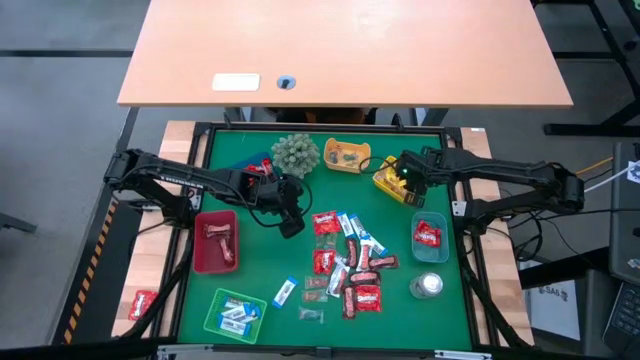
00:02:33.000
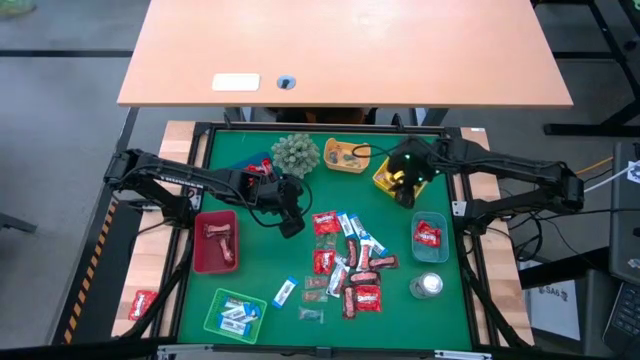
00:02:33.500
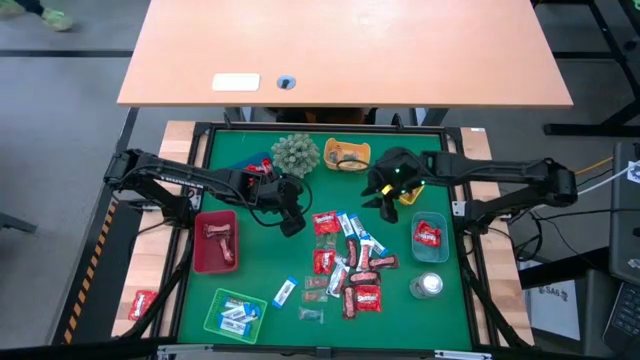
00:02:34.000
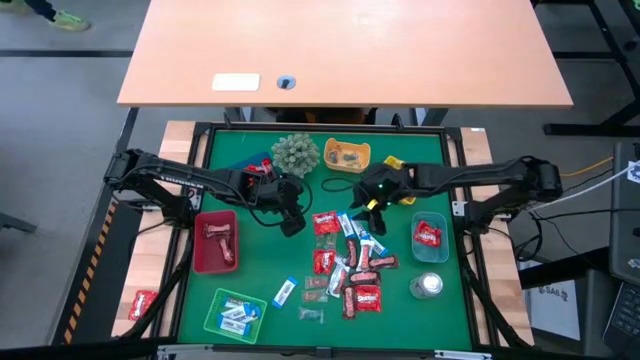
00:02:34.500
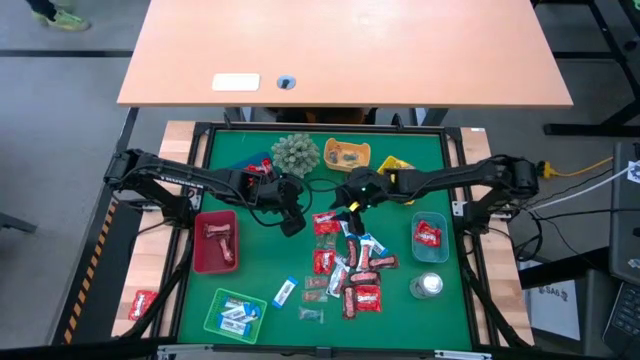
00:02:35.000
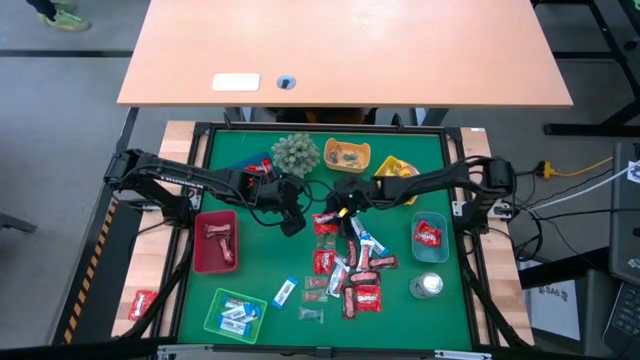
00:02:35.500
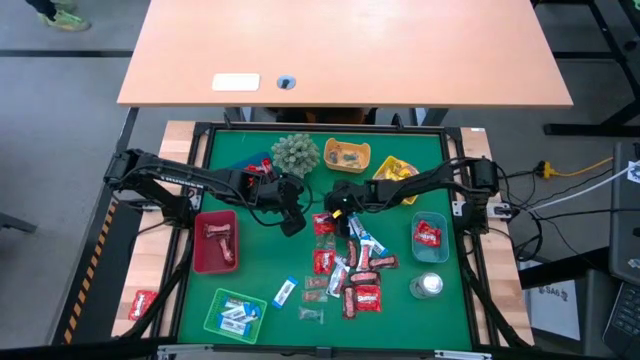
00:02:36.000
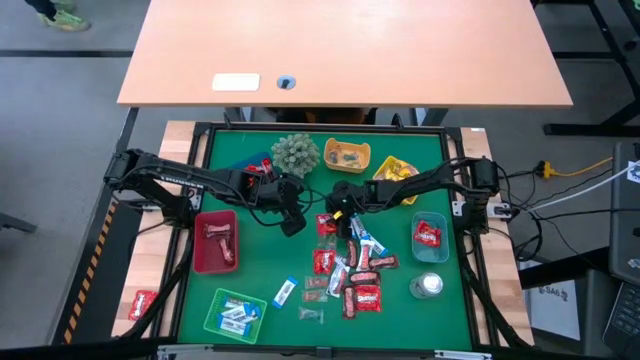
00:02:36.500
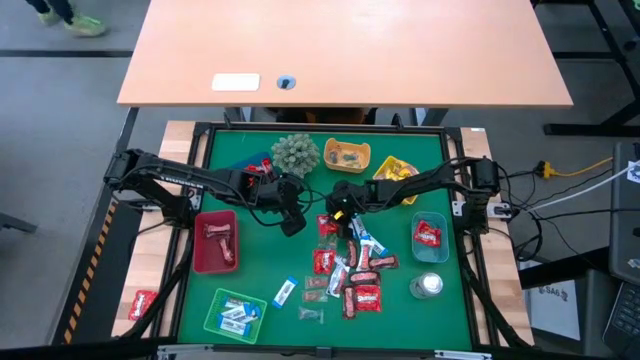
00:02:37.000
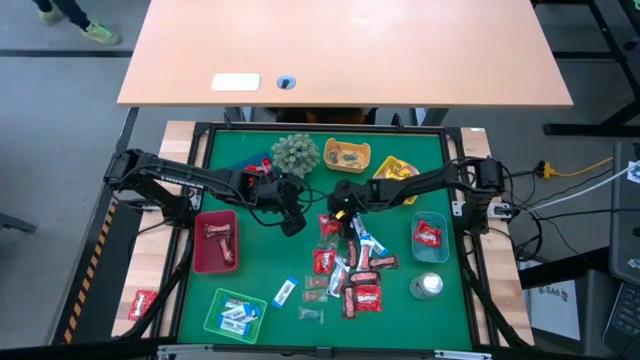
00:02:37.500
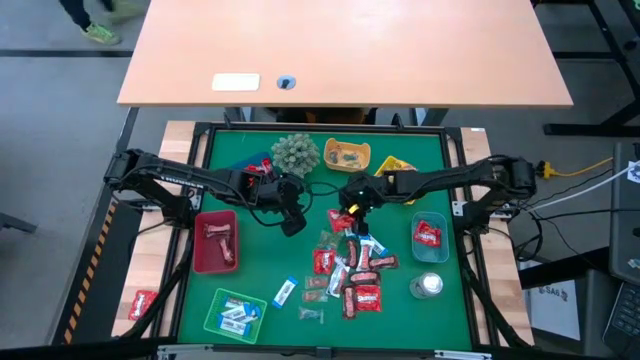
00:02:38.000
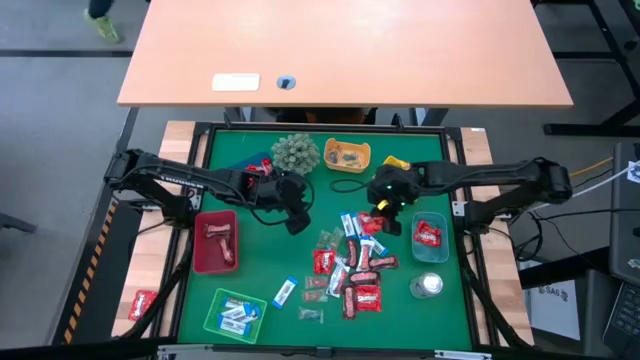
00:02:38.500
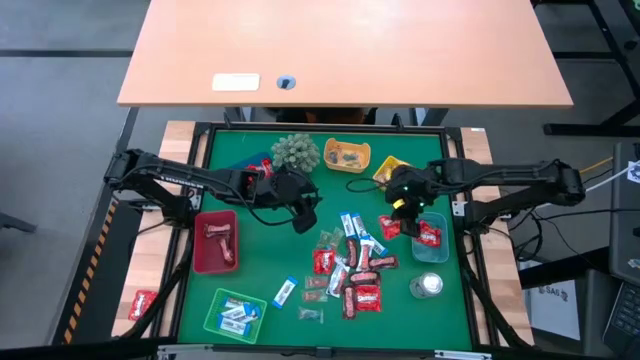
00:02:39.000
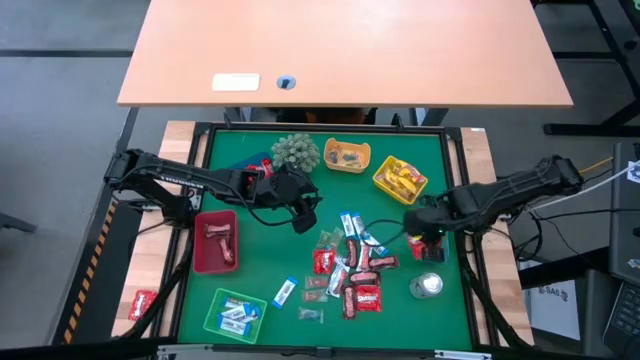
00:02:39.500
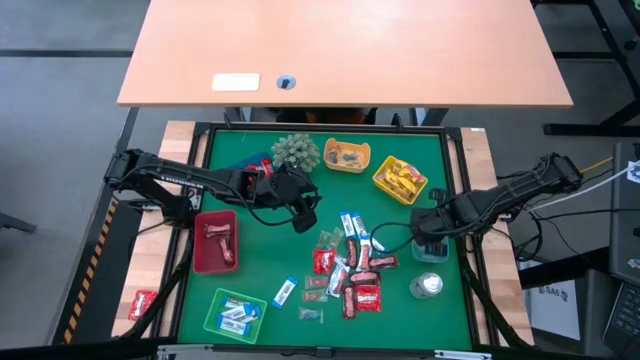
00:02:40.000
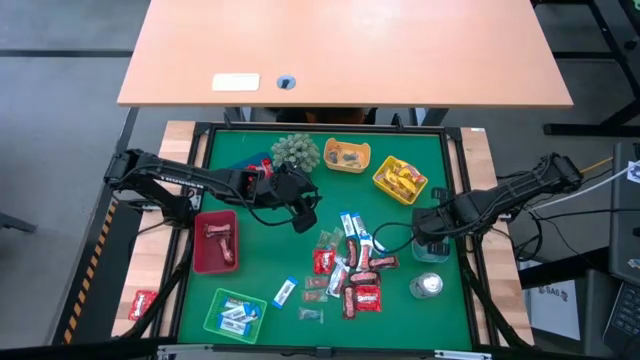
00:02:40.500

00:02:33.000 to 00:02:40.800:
Task: Sort candy
Put the red candy into the gray bin

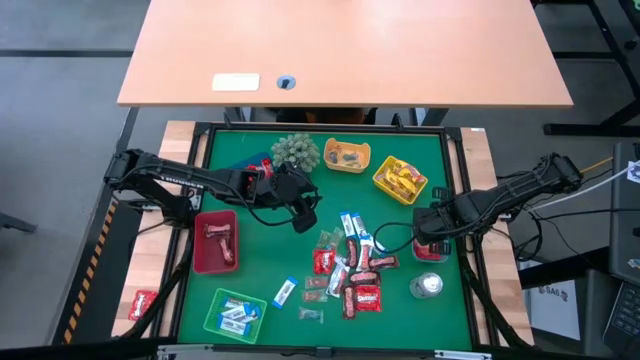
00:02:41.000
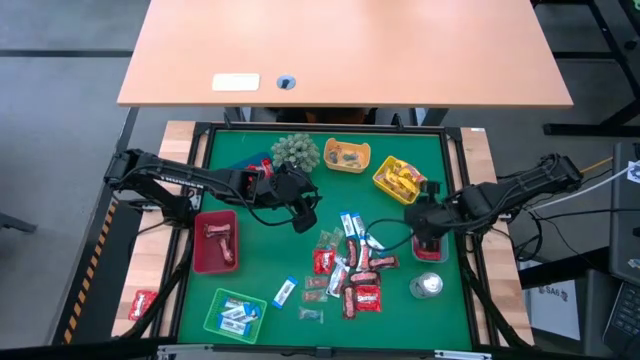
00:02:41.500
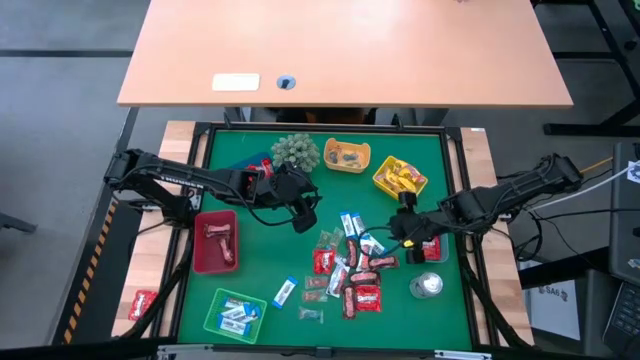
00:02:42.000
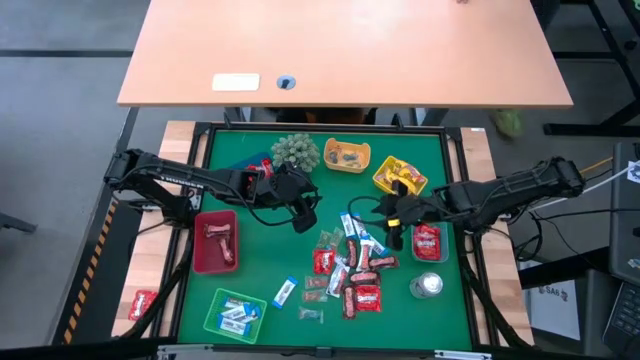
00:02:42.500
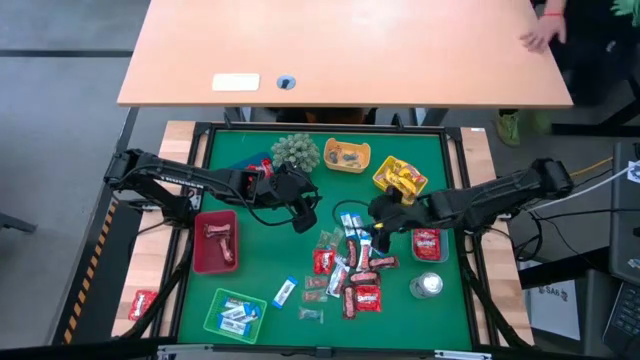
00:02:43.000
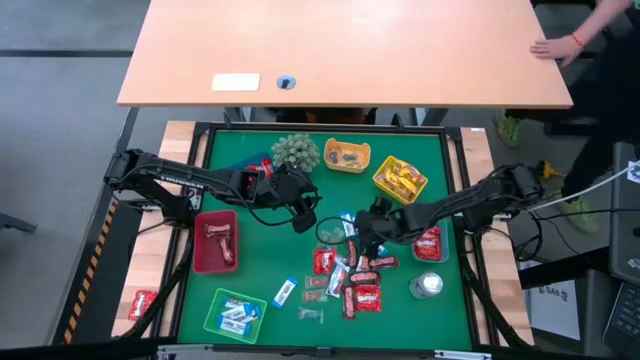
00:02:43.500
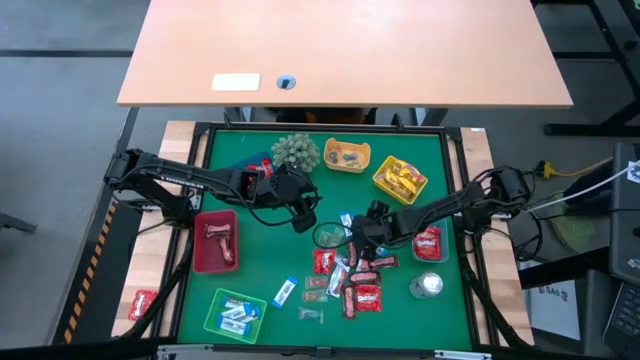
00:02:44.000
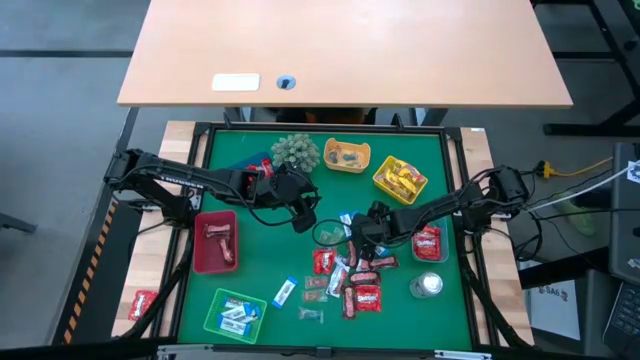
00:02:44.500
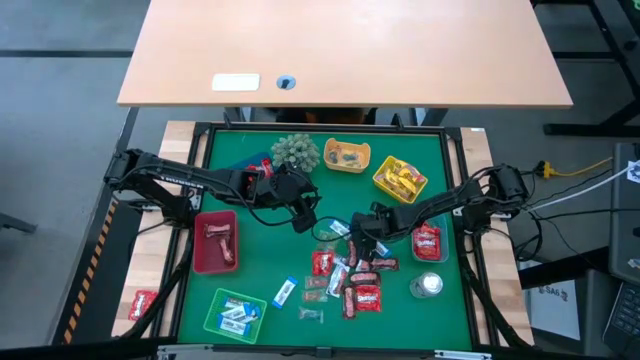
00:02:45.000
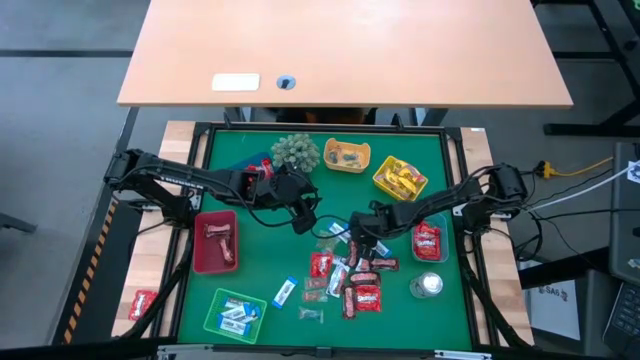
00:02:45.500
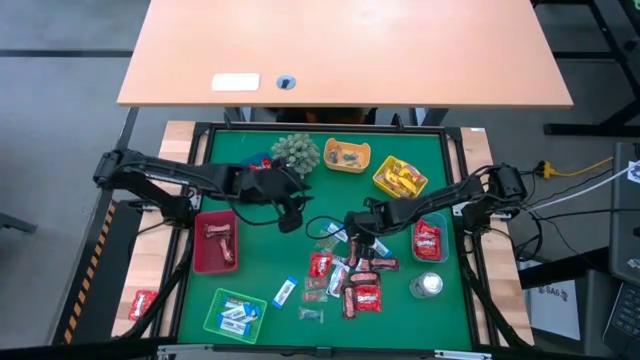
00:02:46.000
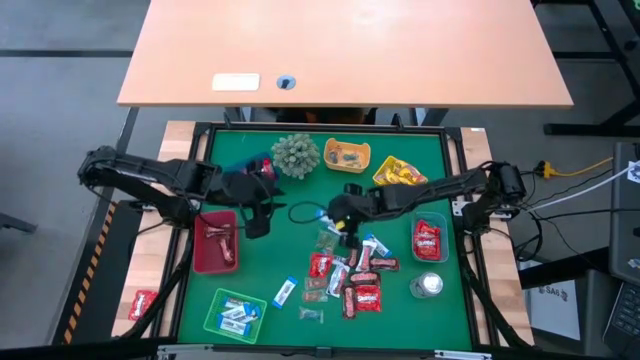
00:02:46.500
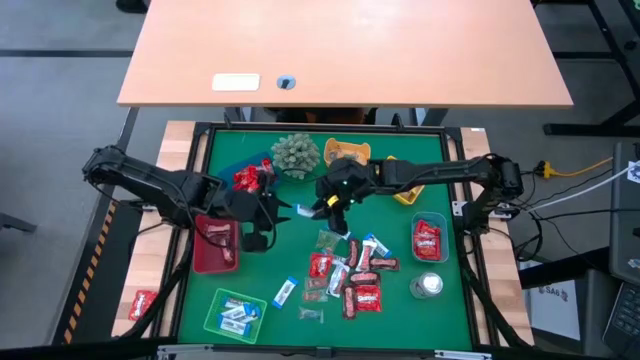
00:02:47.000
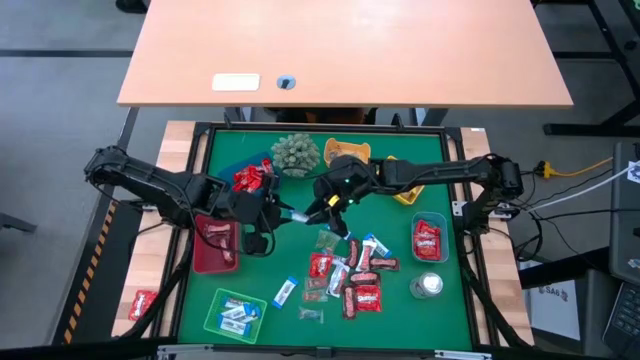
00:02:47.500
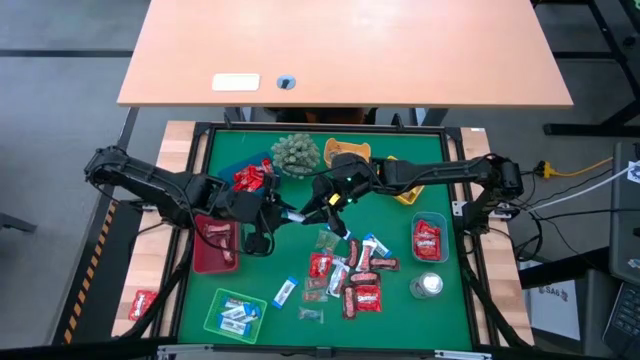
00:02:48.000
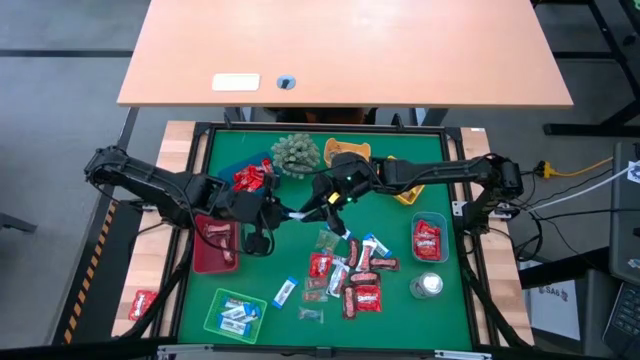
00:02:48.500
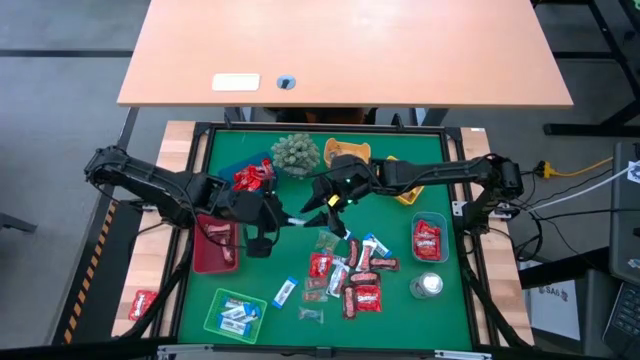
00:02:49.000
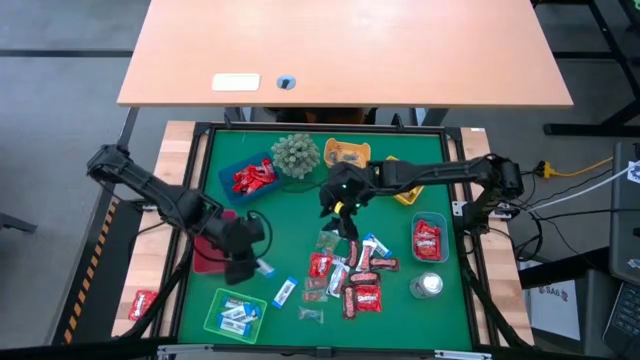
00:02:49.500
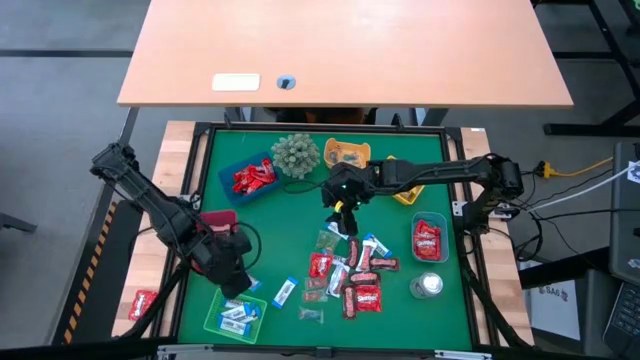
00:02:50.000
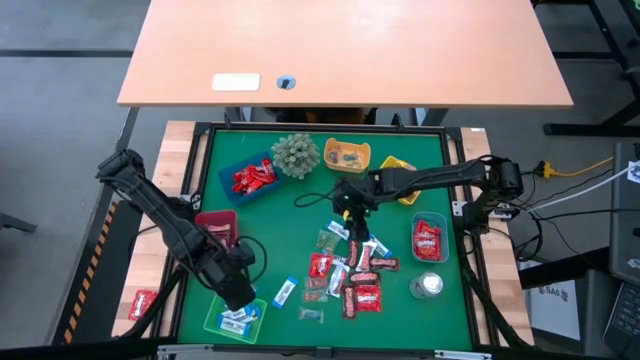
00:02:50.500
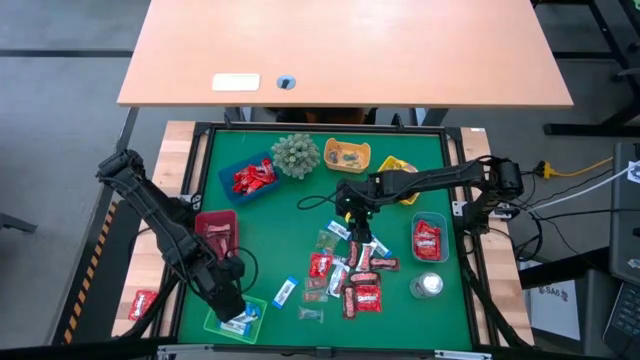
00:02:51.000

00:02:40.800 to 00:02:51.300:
Put the white-blue chocolate into the green bin

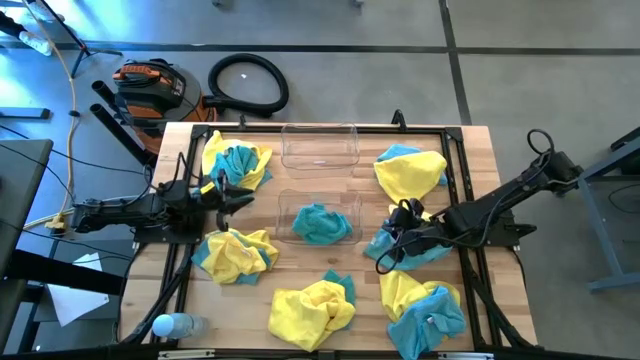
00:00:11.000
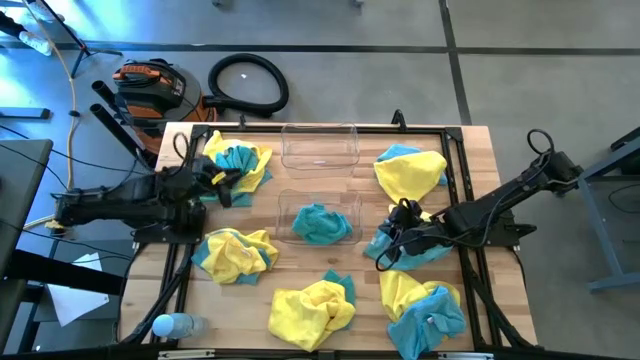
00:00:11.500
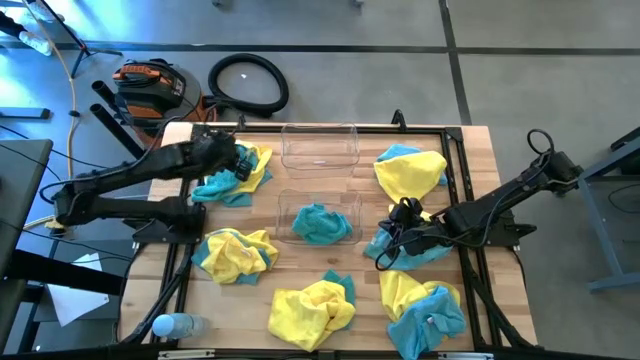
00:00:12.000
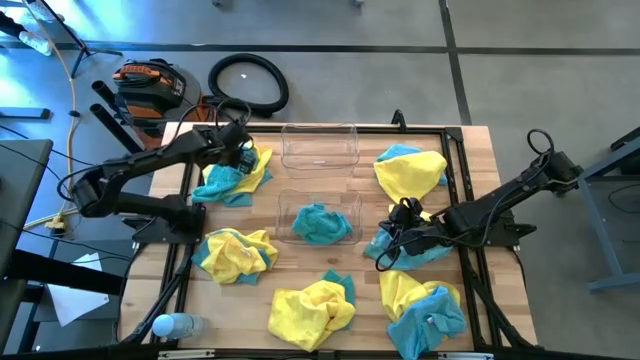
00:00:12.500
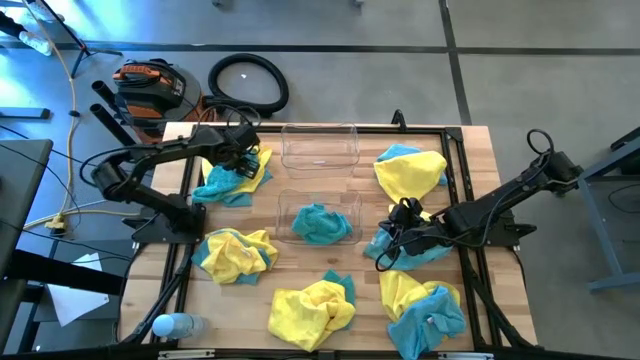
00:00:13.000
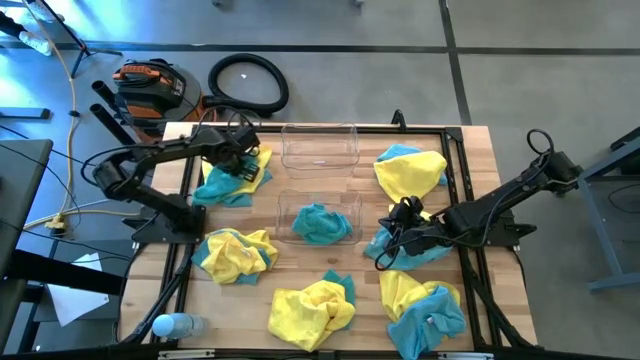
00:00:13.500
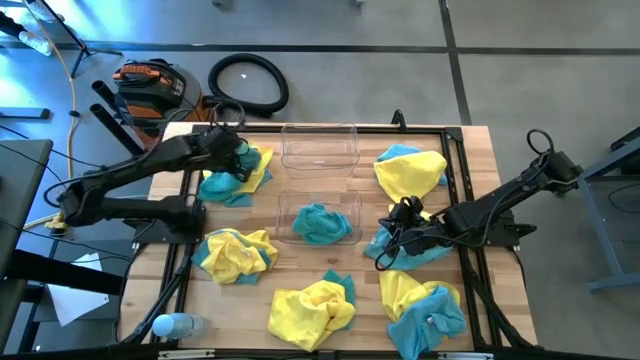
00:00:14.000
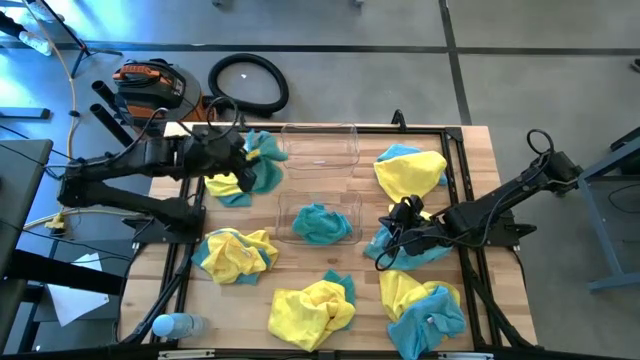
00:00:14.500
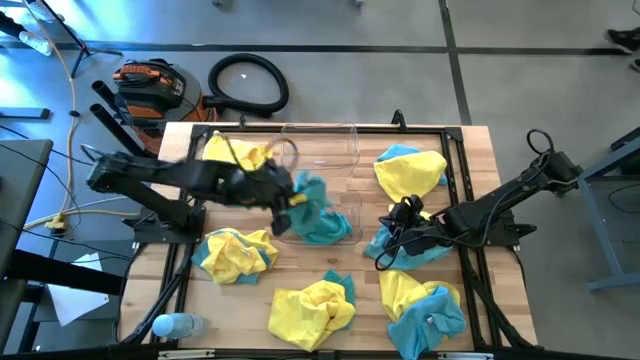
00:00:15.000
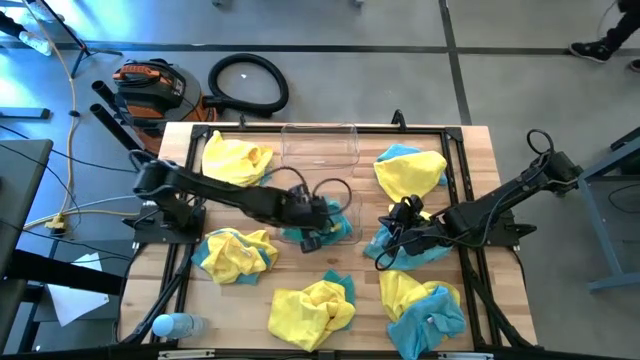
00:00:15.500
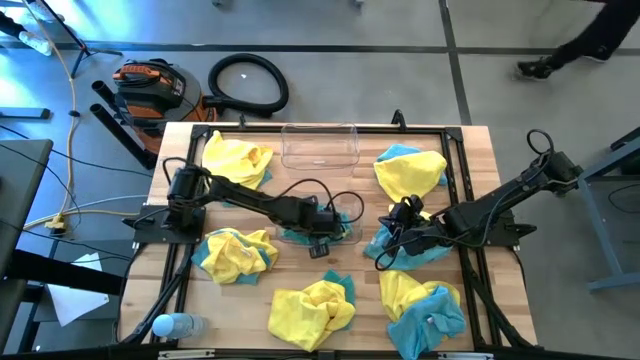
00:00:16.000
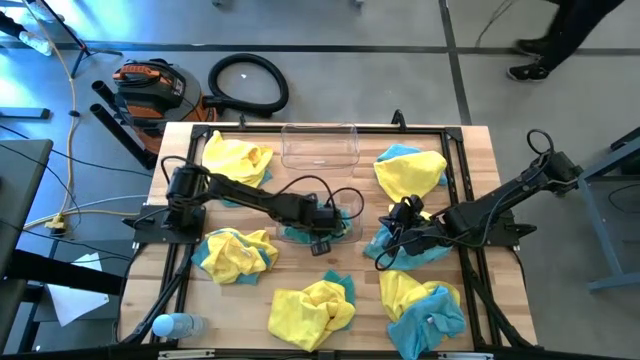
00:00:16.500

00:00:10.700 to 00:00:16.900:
Task: Sort microfiber towel by color & place in baskets
Put the blue microfiber towel into the bottom transparent bin
